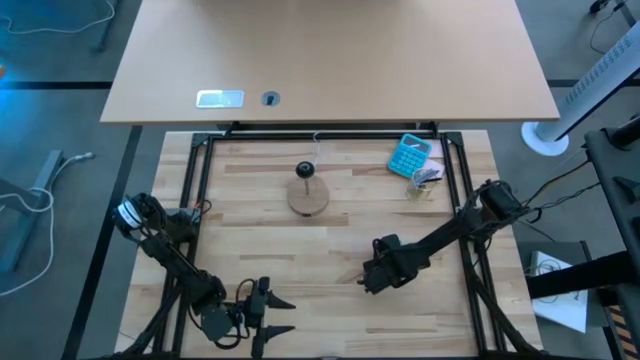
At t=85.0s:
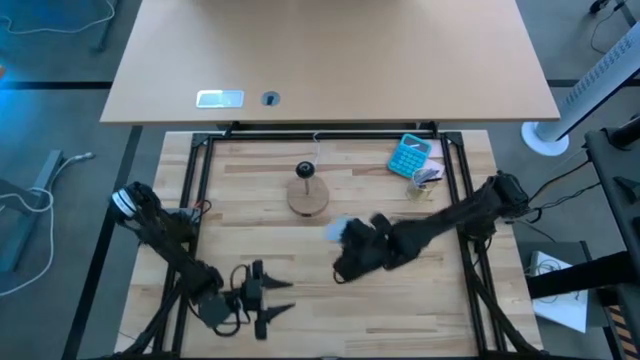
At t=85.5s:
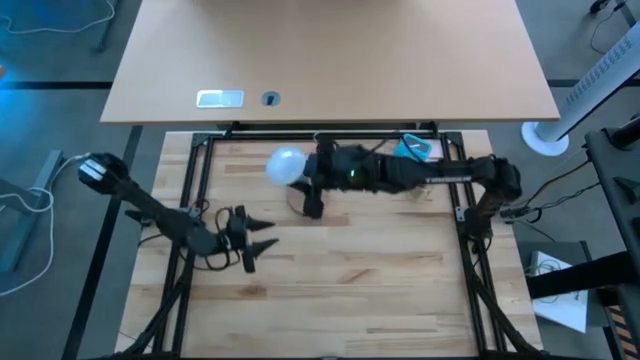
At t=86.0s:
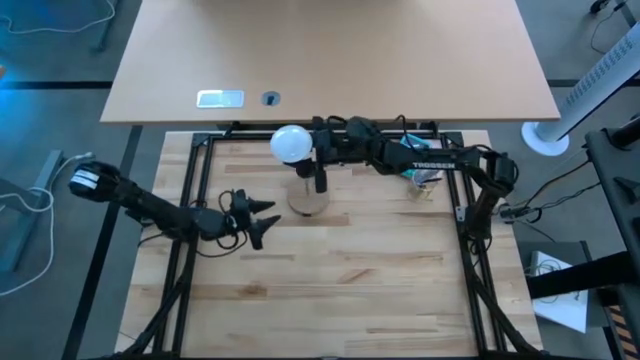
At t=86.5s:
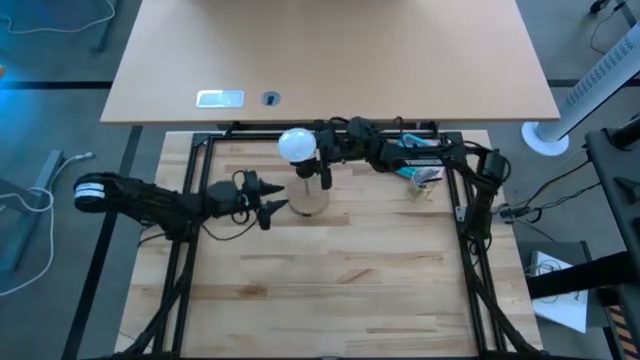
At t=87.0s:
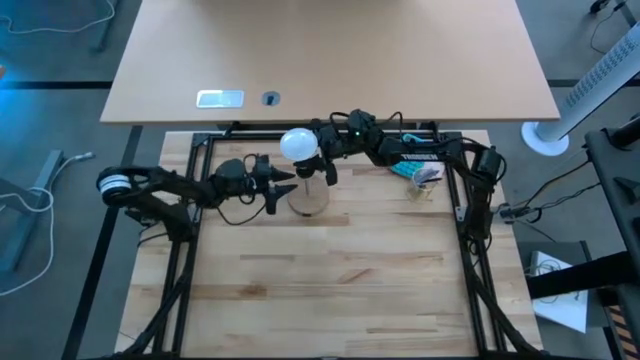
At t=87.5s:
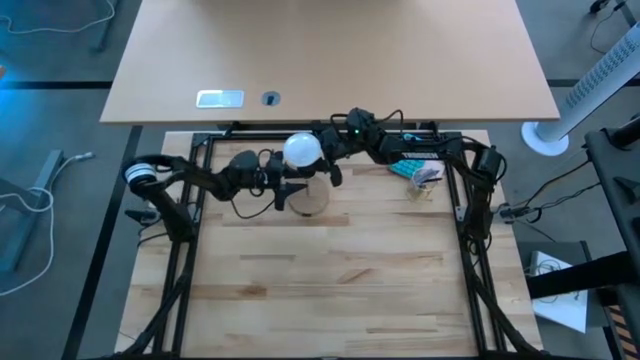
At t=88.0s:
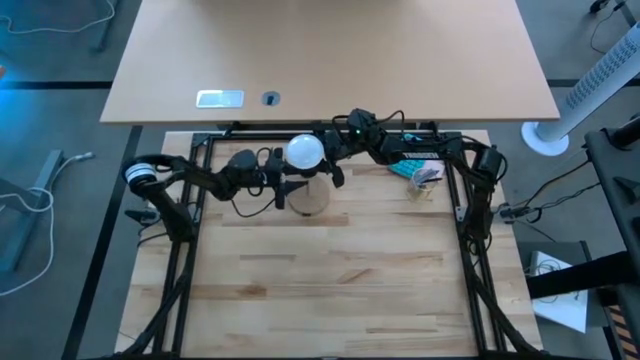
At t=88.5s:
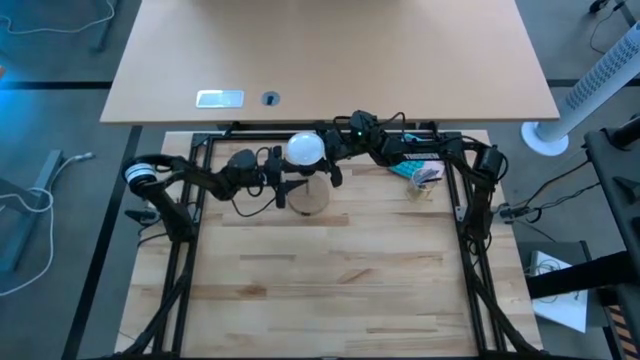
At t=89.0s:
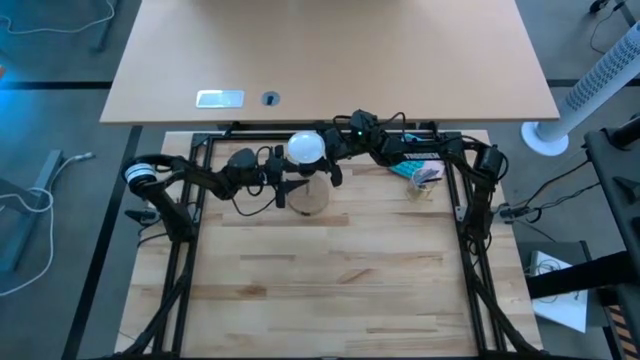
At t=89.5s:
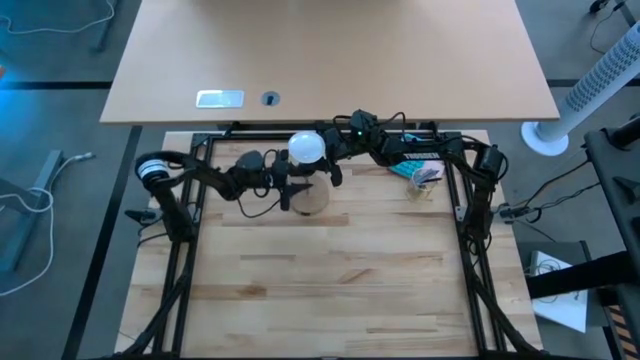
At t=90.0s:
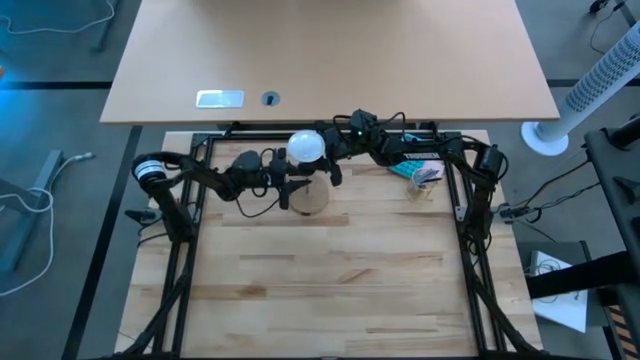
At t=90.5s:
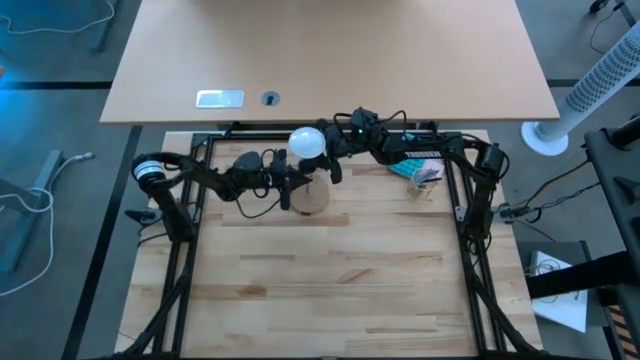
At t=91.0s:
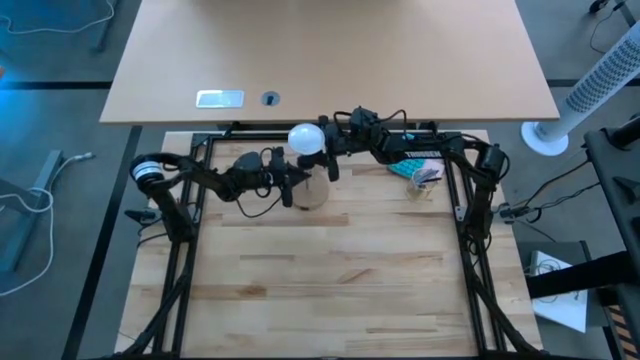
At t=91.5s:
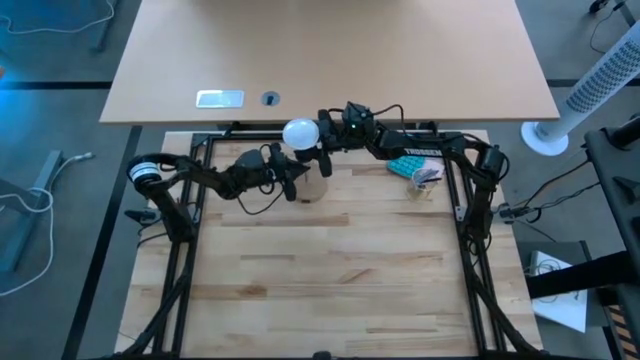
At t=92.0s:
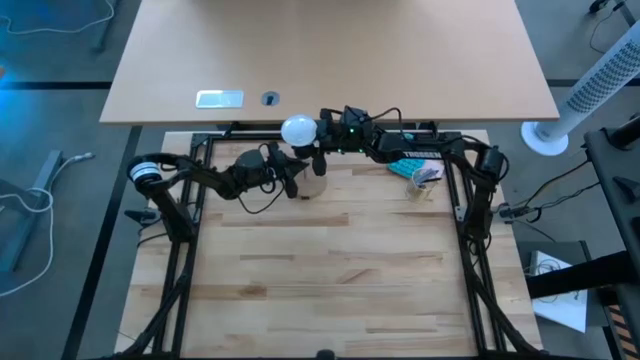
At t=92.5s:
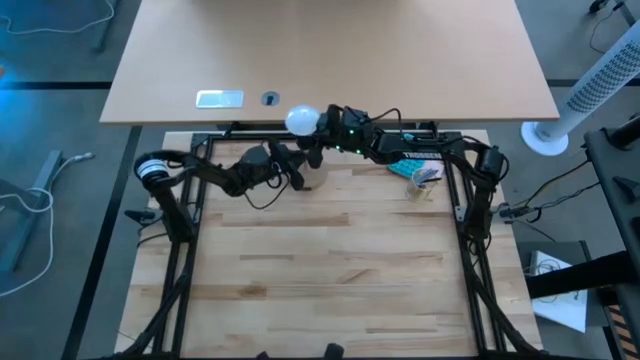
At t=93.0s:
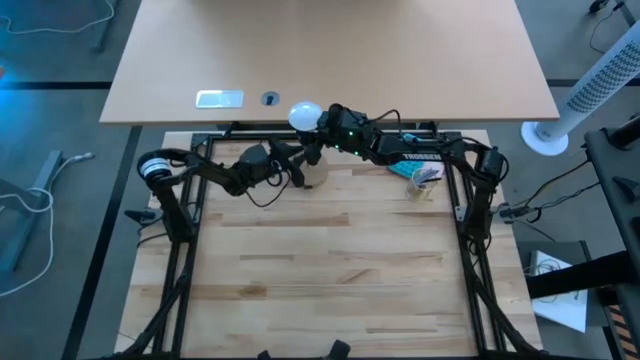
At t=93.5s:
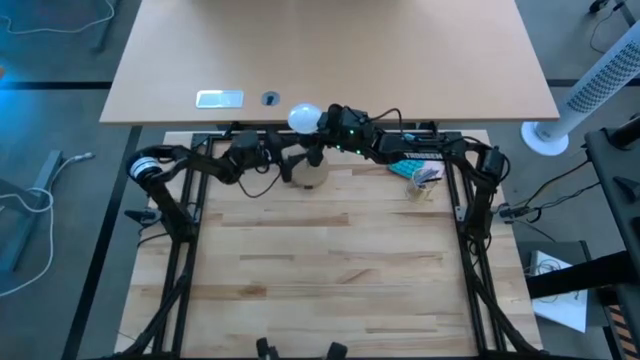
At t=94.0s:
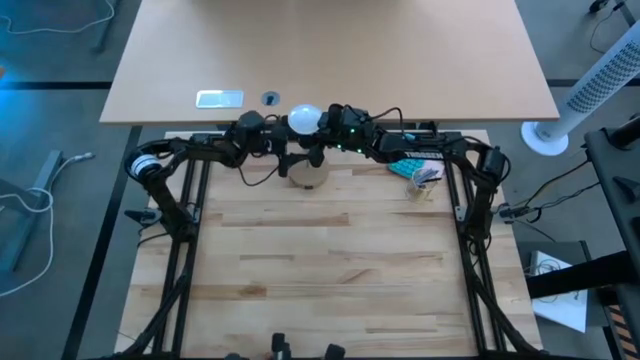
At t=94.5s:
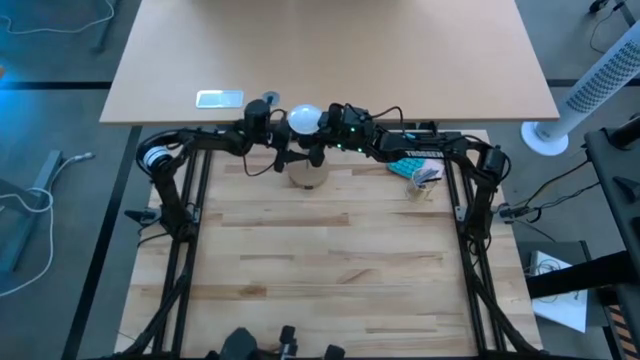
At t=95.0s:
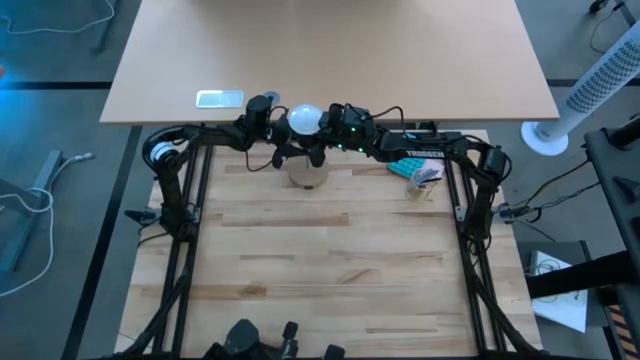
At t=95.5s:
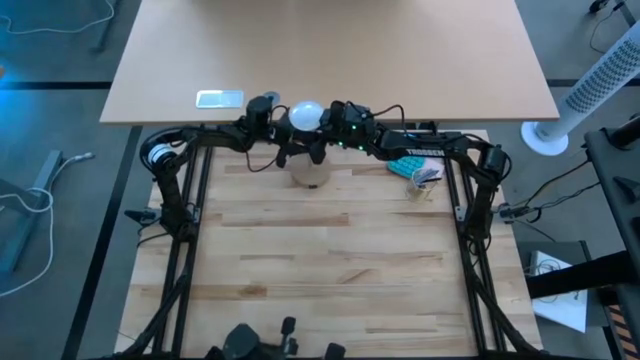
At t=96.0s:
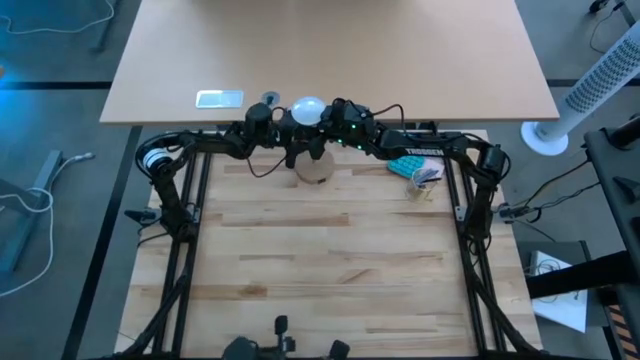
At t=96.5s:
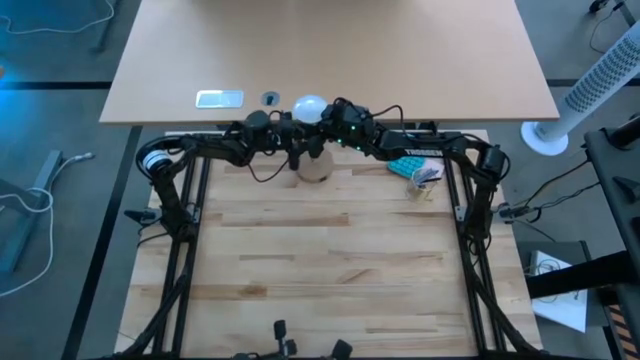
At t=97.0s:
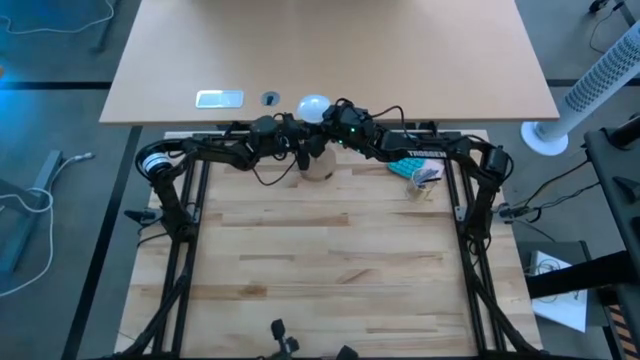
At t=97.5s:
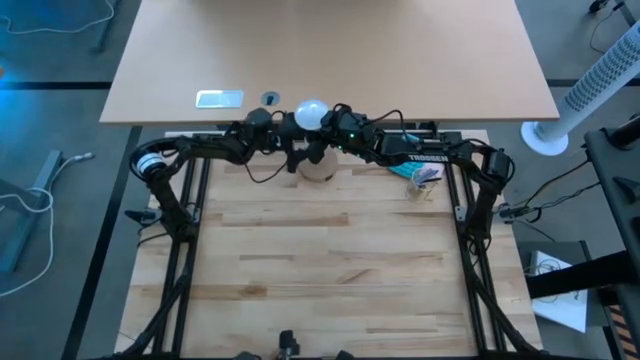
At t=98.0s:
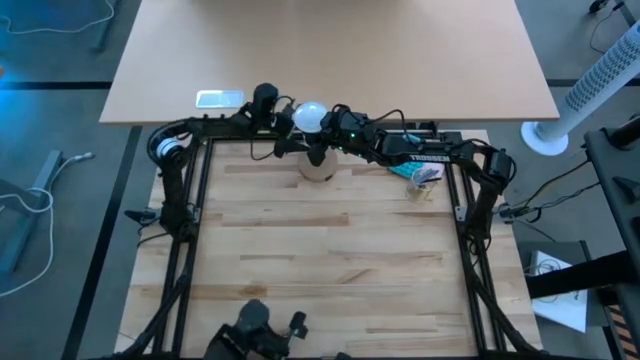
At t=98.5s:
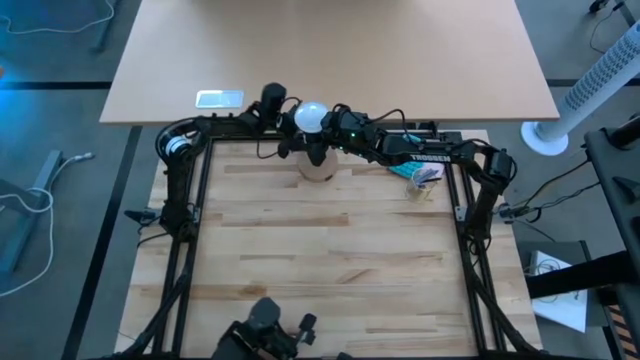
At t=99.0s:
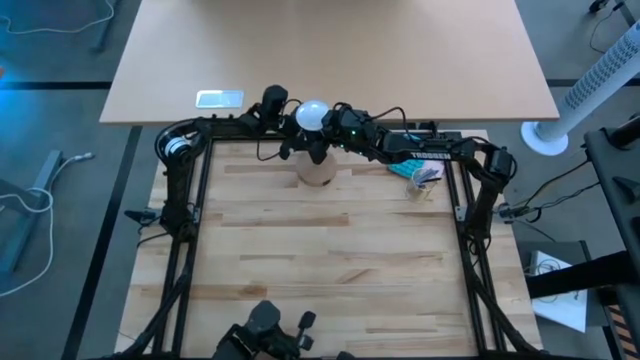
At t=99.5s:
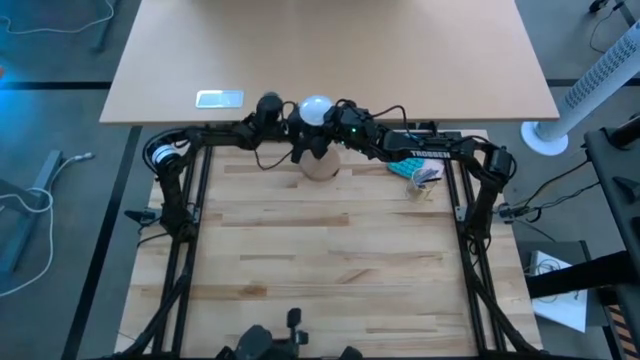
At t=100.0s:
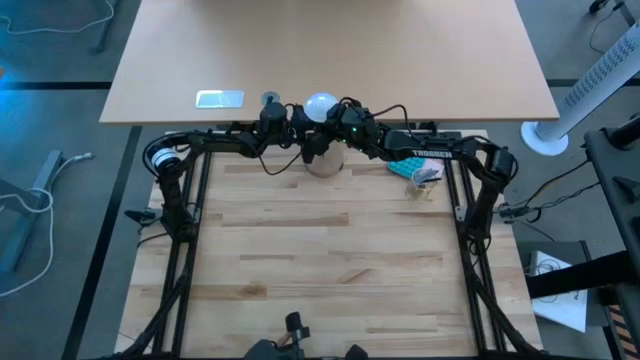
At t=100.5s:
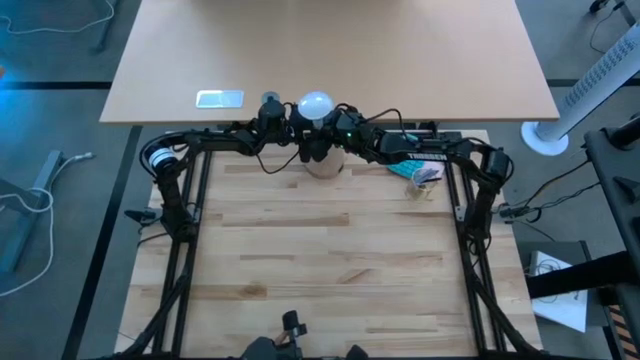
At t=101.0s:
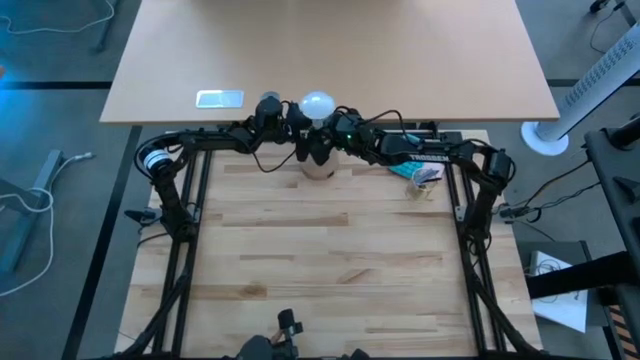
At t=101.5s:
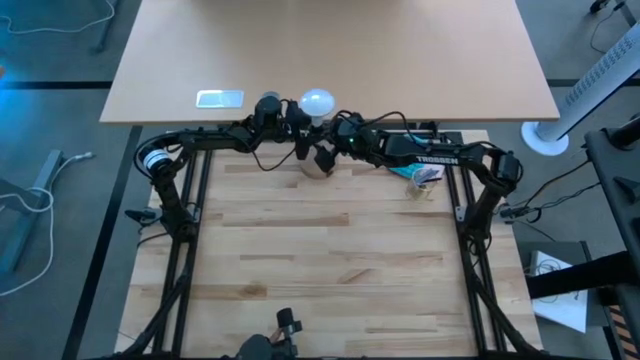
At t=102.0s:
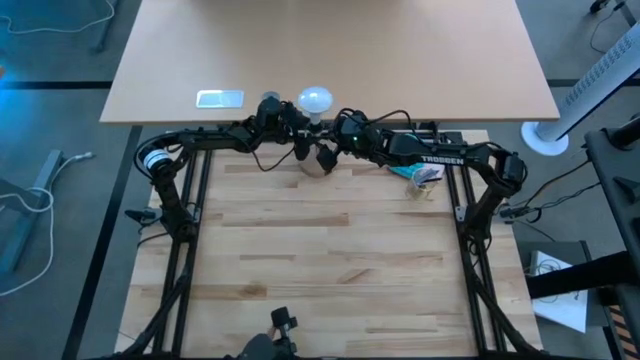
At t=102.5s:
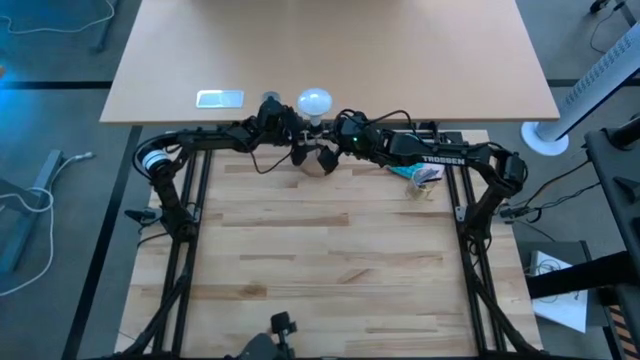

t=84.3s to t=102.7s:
Task: Screw lightbulb
Insert the light bulb into the table lamp
